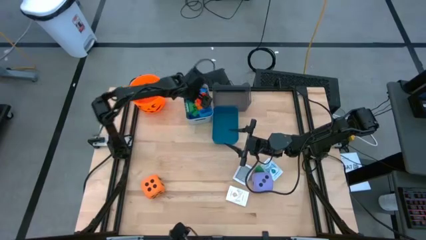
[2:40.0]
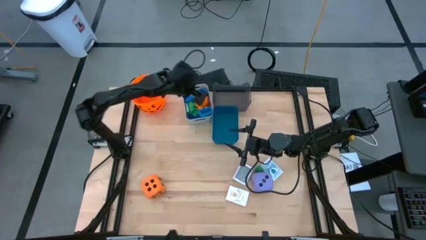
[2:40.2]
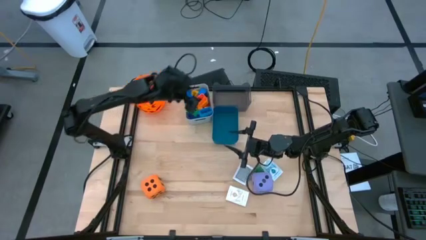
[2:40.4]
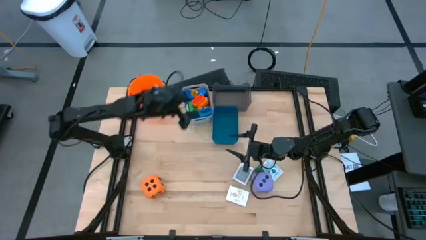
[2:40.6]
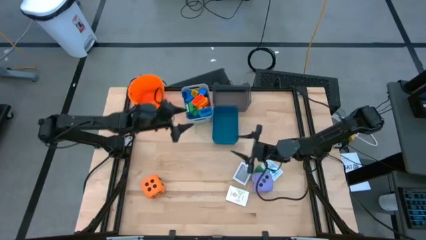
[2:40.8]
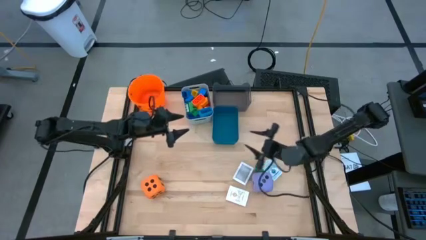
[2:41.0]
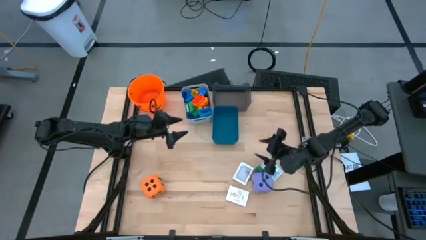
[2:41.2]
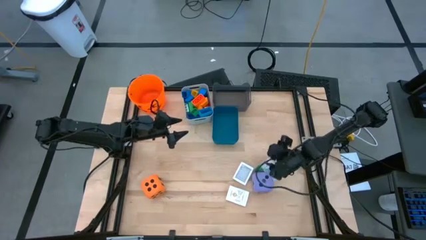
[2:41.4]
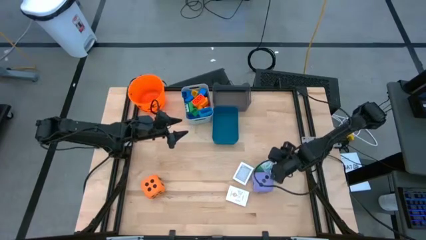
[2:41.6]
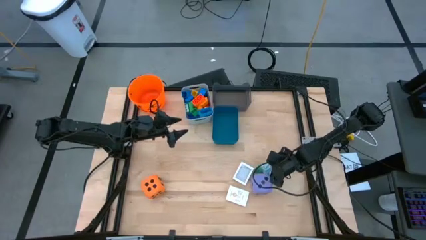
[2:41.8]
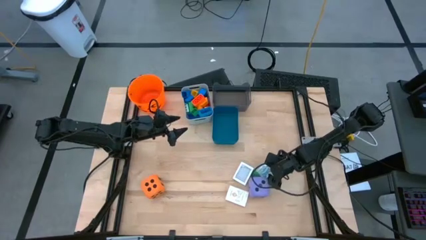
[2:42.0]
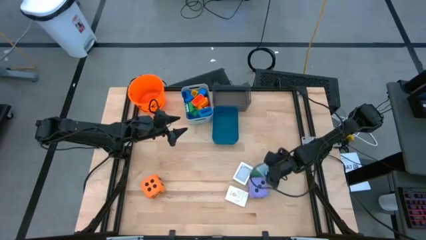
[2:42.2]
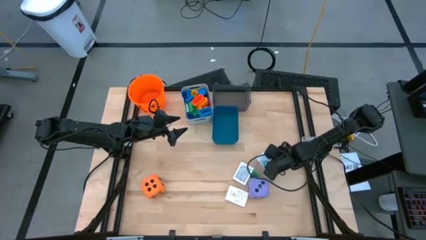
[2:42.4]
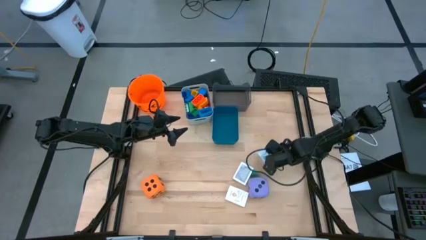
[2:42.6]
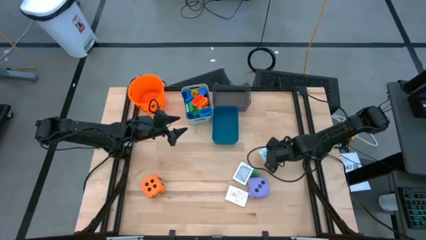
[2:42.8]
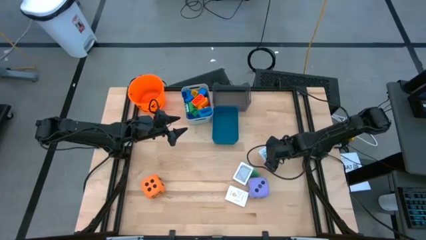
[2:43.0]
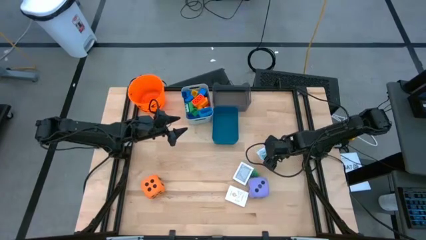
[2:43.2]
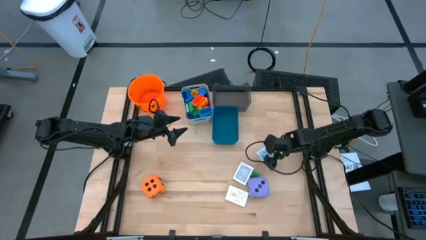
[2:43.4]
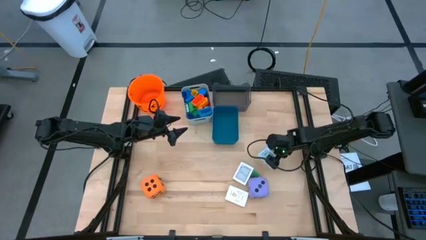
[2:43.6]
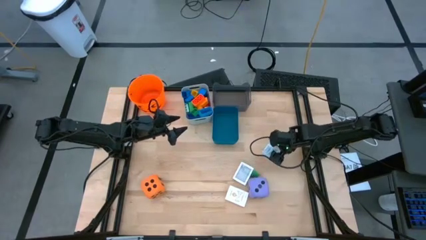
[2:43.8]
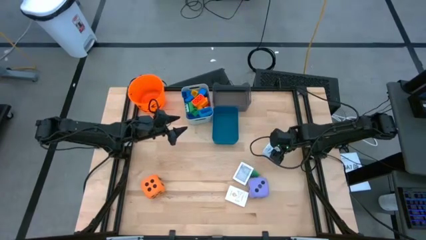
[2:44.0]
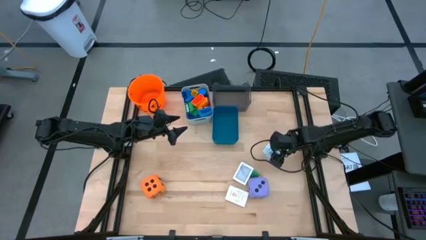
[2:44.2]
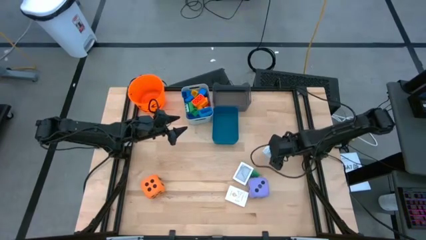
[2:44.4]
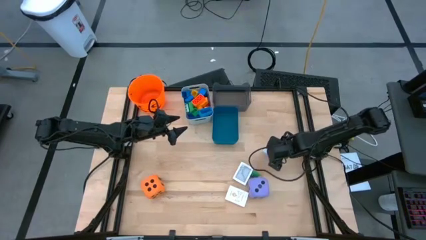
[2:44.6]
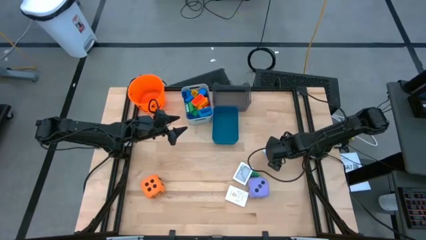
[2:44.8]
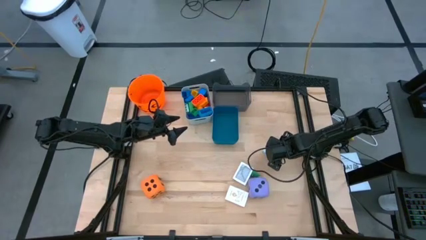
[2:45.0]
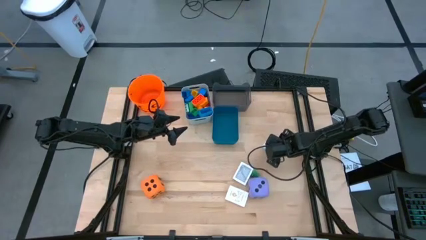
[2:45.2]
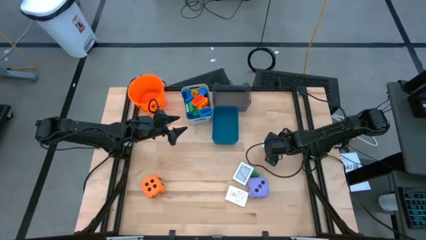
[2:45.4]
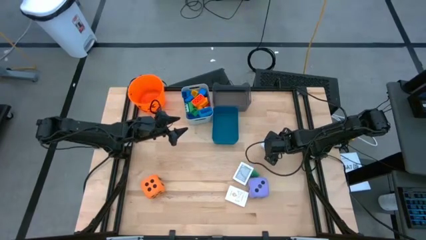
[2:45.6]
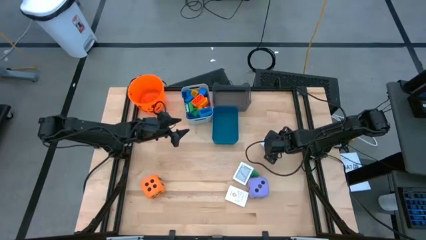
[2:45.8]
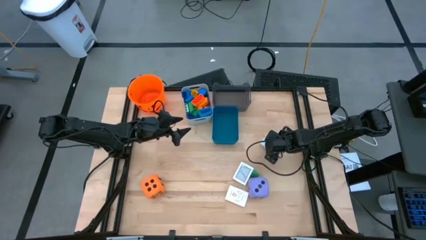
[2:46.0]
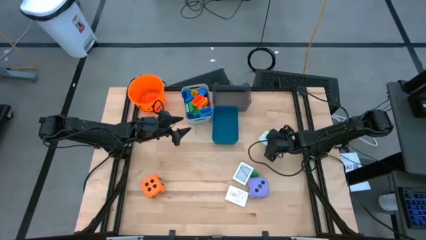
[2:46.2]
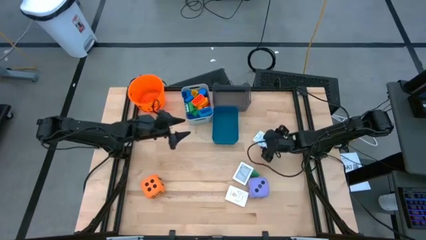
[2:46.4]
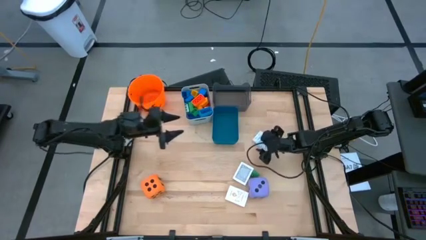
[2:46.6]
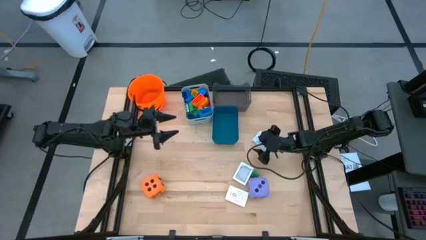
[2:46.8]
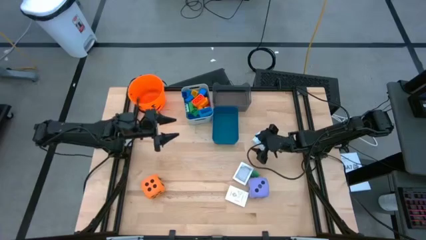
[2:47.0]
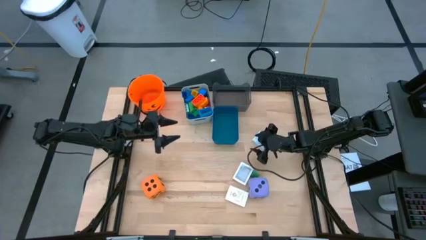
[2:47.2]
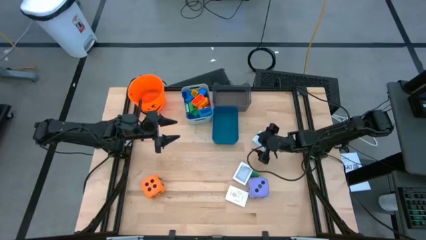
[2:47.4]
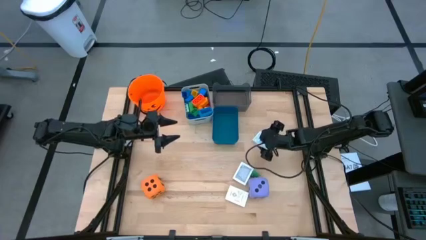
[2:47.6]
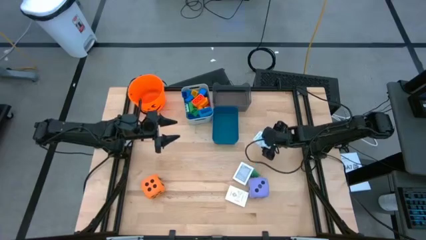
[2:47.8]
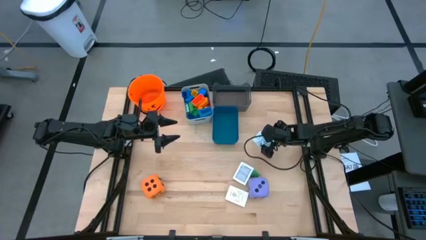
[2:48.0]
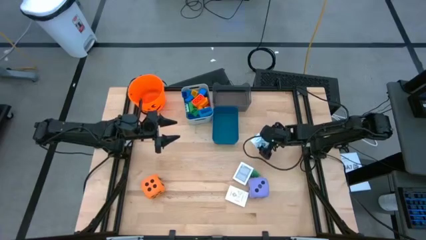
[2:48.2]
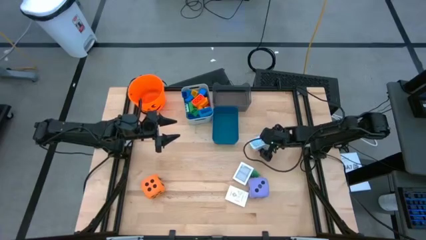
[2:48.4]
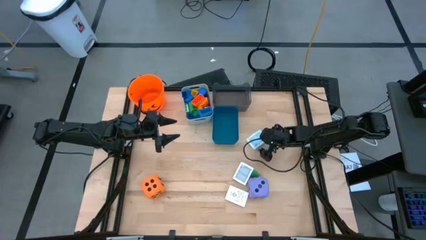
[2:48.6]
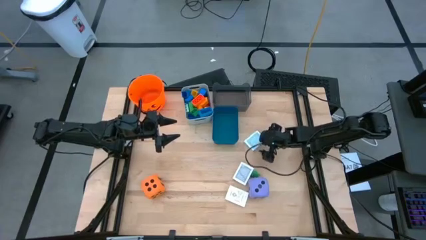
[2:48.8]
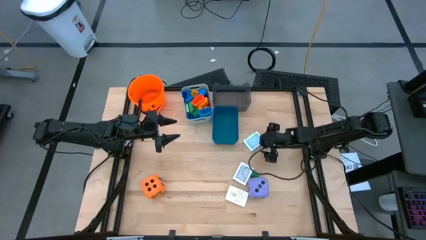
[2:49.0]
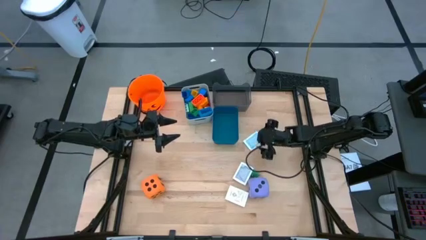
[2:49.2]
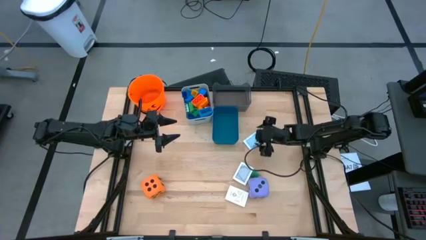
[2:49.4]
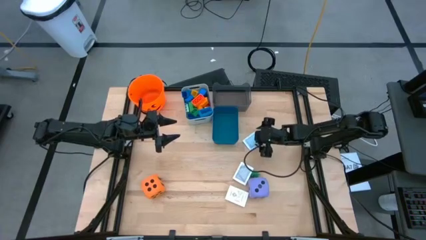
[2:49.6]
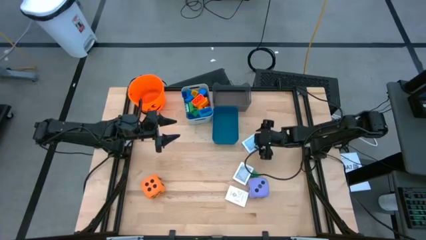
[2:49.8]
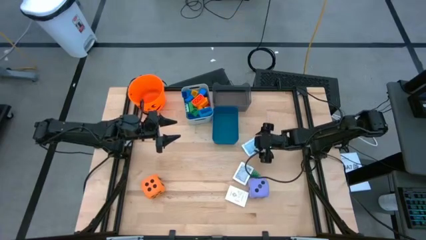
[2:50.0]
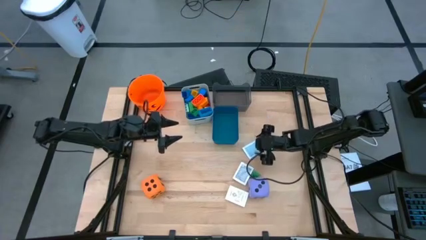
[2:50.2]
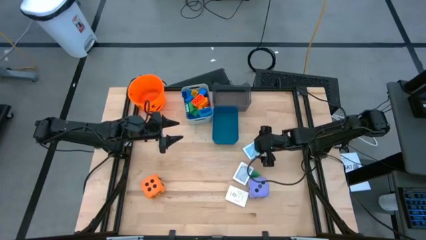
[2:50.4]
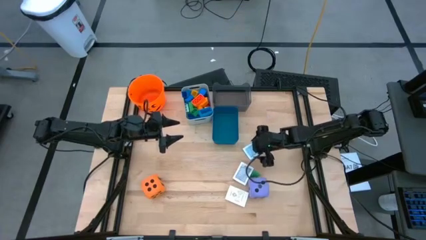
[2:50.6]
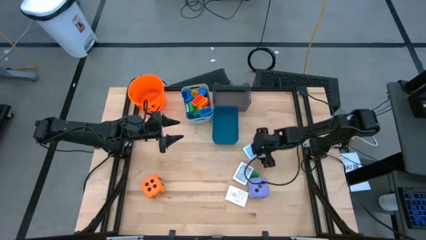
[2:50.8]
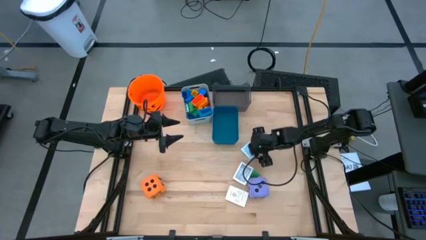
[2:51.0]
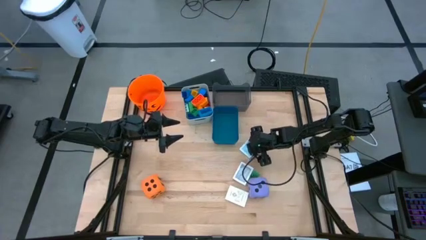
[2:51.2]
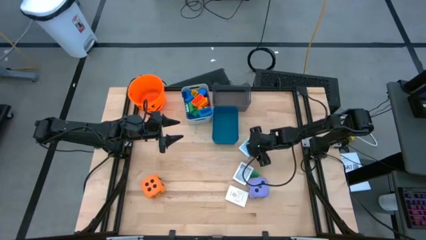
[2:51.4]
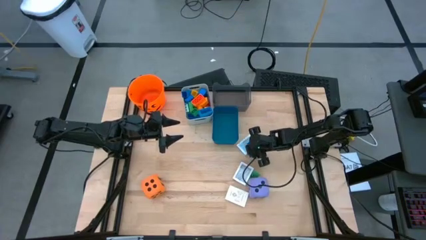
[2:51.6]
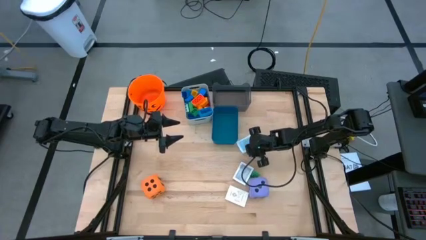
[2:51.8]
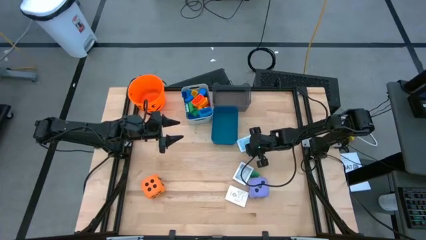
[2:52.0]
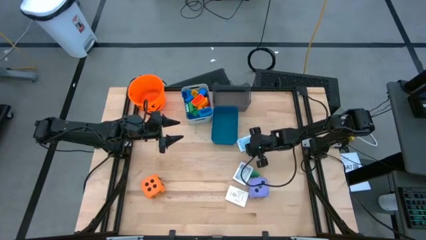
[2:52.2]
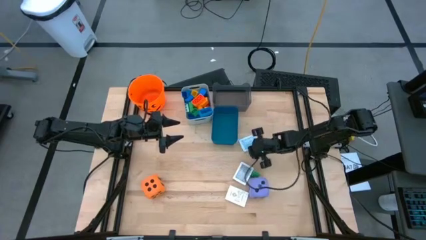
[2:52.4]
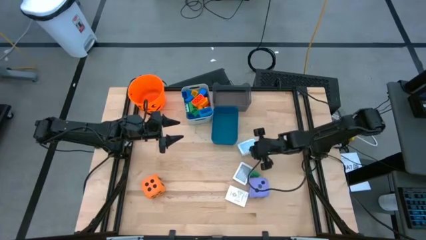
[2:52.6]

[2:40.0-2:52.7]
Task: Pick & Place Toys
Put the white and blue deck of cards into the black bin

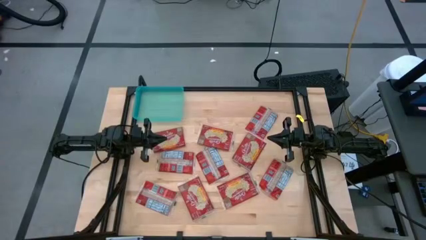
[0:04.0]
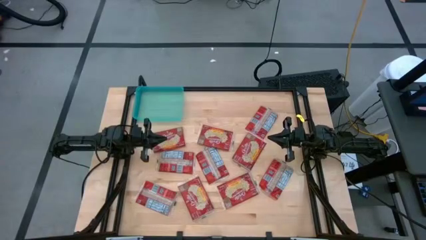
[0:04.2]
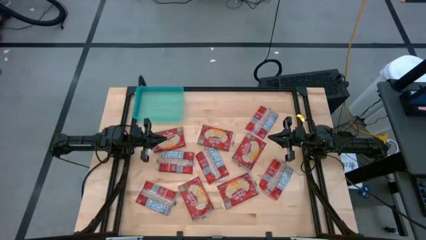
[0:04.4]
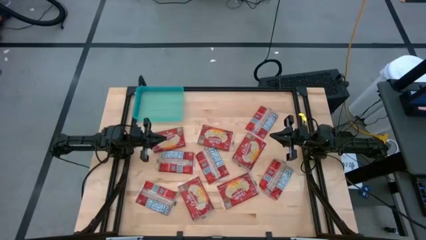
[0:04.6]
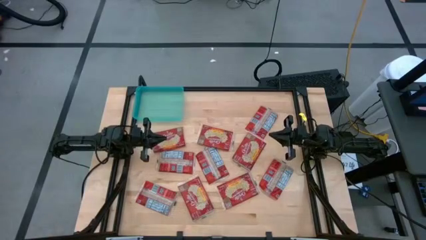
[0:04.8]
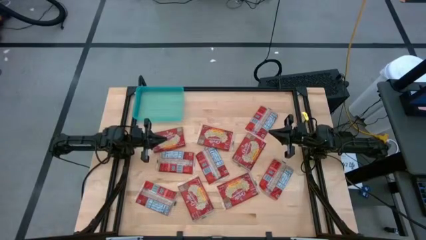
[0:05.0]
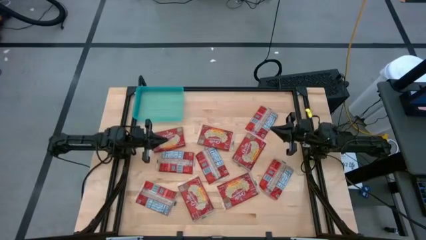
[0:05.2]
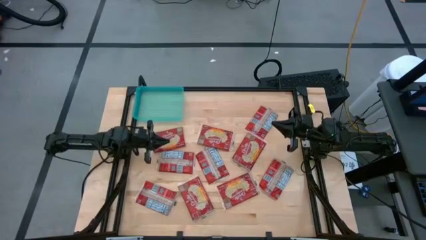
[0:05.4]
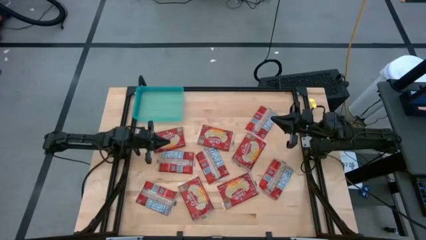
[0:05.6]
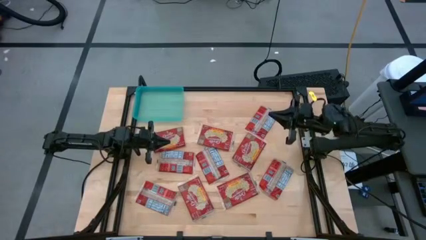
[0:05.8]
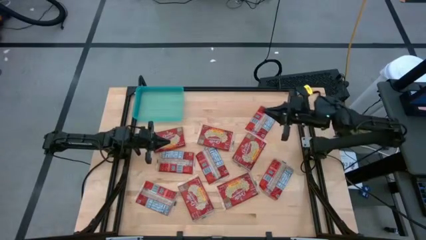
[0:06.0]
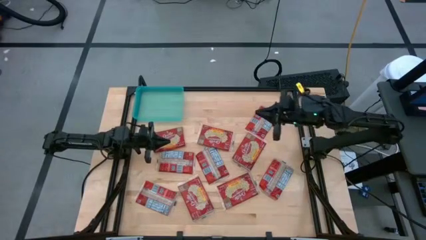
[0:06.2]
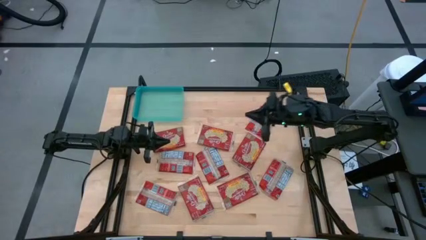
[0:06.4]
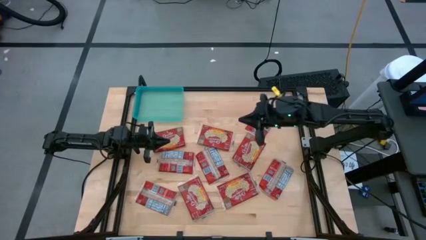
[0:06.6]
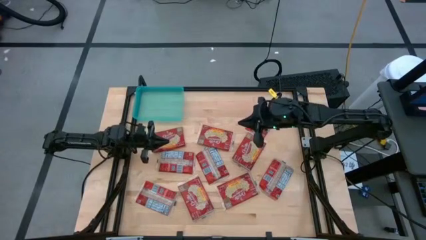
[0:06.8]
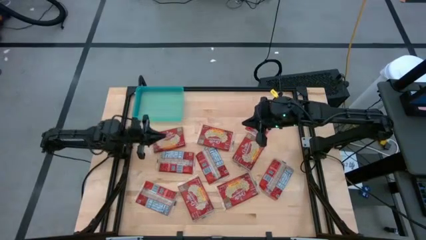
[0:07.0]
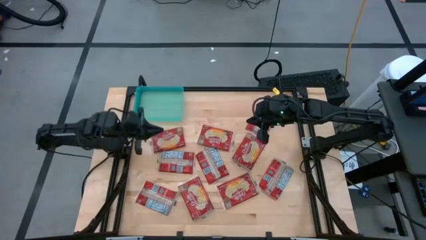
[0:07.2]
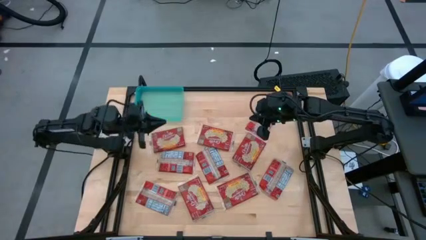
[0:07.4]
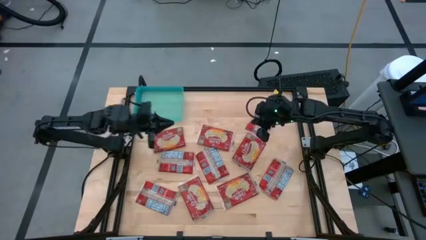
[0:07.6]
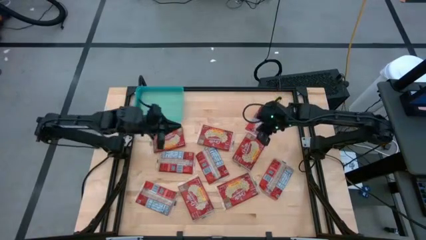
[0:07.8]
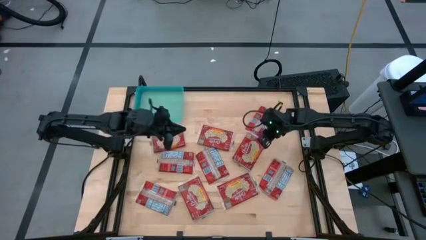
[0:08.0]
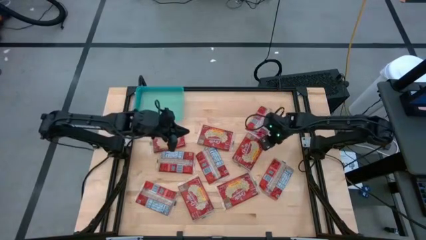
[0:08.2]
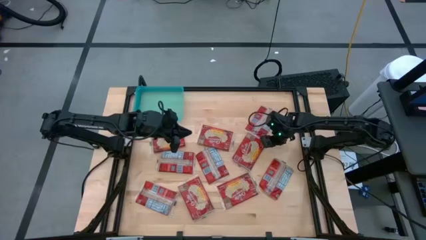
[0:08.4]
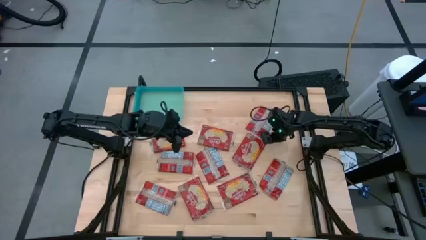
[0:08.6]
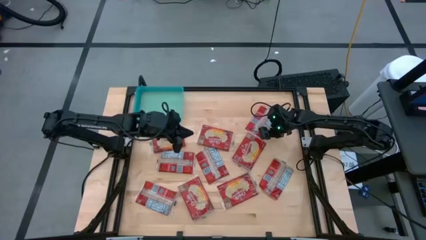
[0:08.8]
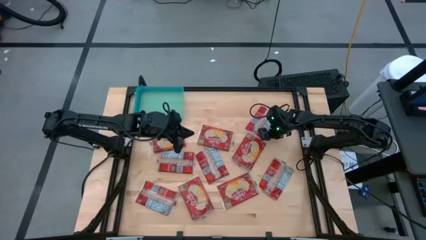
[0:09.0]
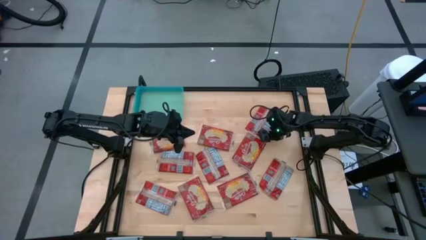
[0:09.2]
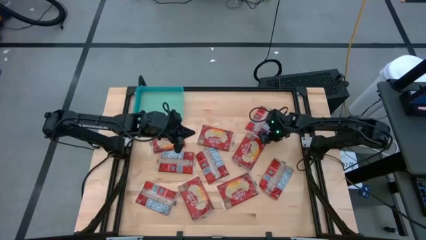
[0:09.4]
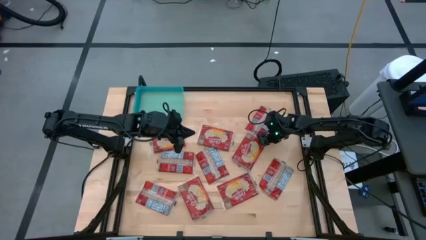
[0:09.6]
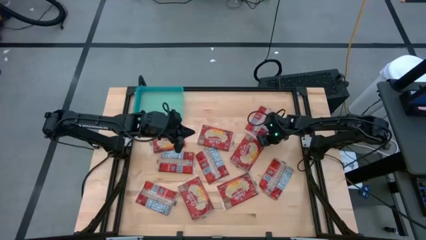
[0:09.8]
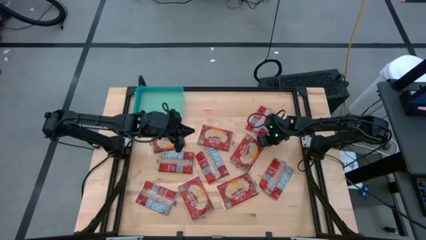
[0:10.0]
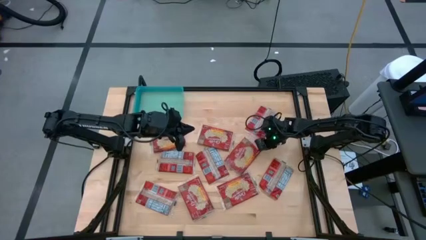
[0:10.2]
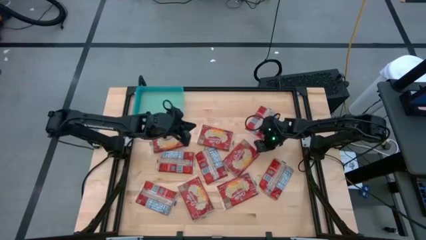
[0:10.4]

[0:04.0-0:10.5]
Task: Sort popcorn bags into baskets
Put the red popcorn bag into the blue bin
